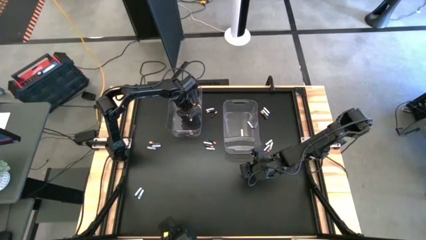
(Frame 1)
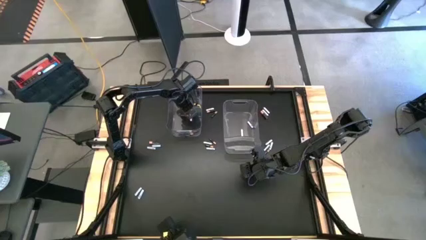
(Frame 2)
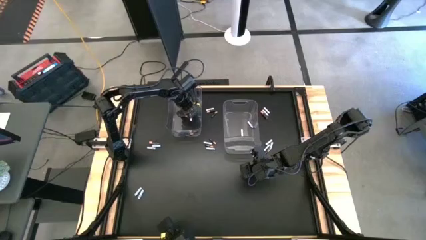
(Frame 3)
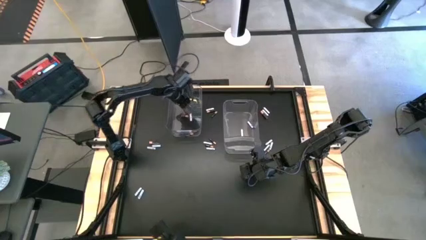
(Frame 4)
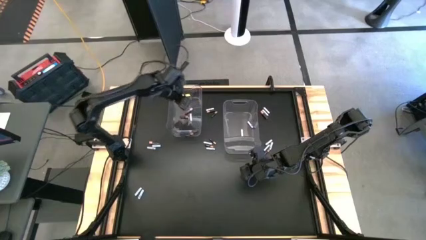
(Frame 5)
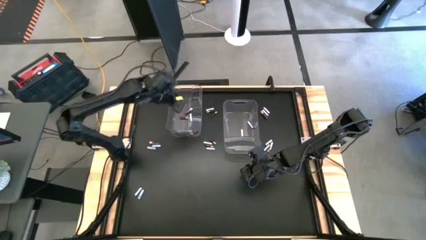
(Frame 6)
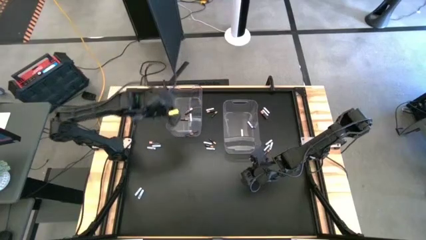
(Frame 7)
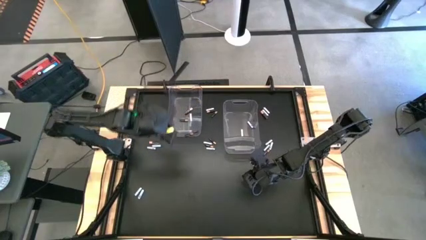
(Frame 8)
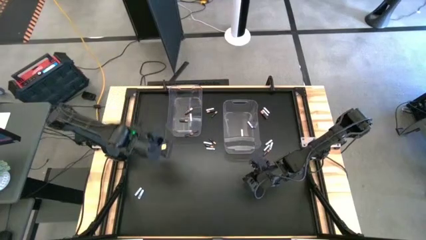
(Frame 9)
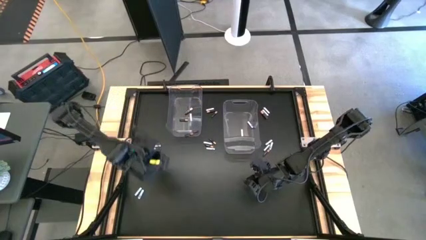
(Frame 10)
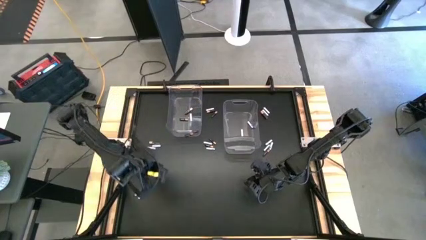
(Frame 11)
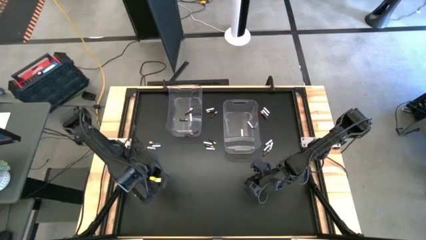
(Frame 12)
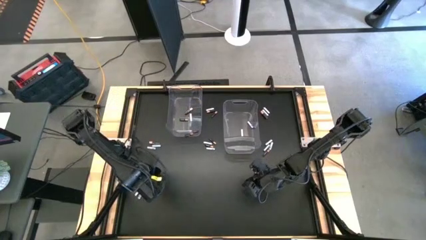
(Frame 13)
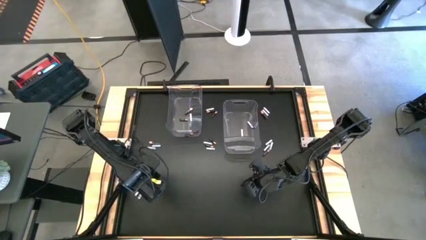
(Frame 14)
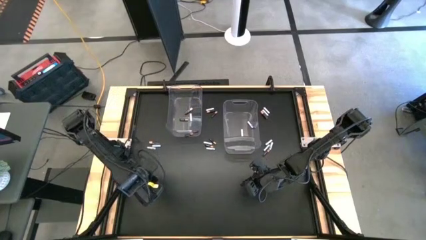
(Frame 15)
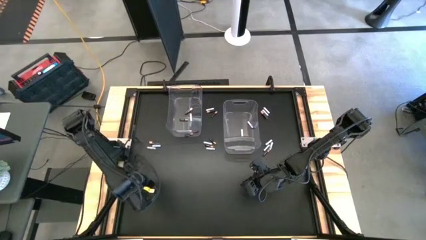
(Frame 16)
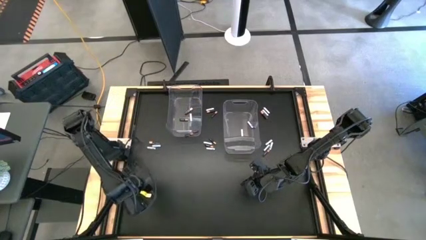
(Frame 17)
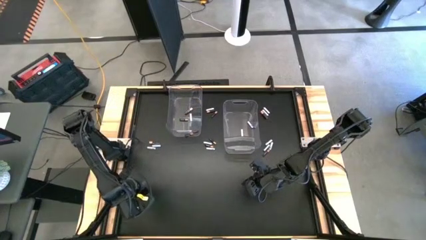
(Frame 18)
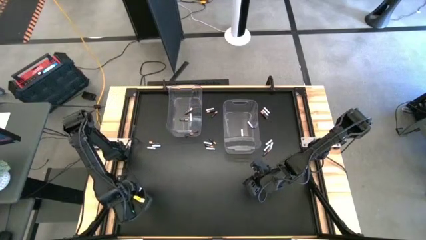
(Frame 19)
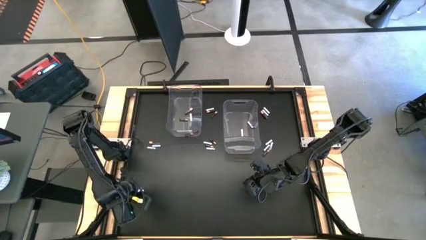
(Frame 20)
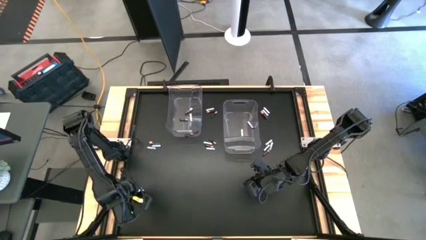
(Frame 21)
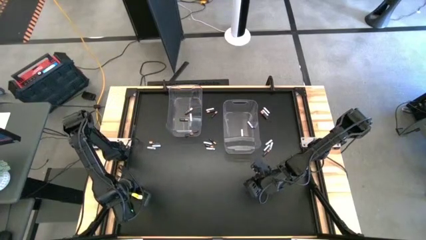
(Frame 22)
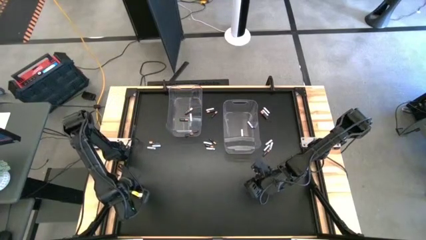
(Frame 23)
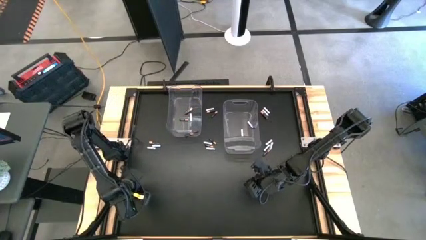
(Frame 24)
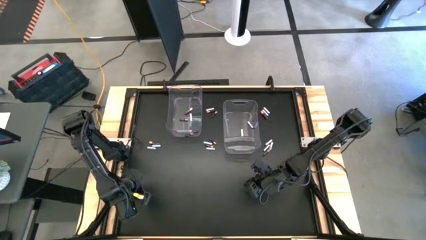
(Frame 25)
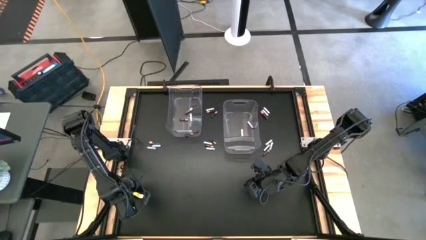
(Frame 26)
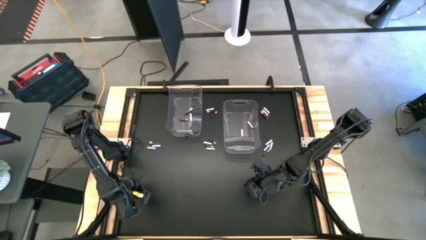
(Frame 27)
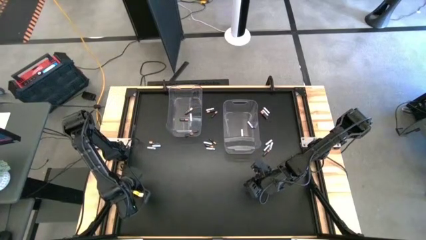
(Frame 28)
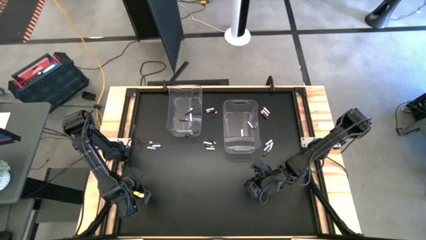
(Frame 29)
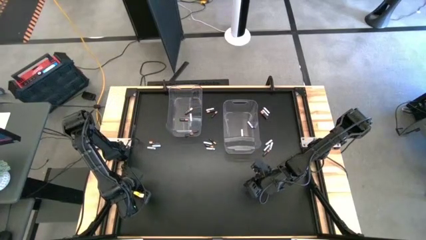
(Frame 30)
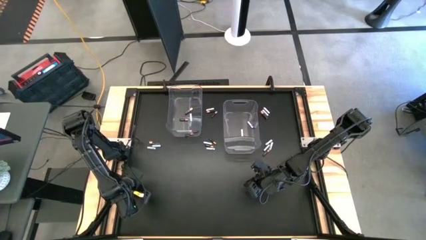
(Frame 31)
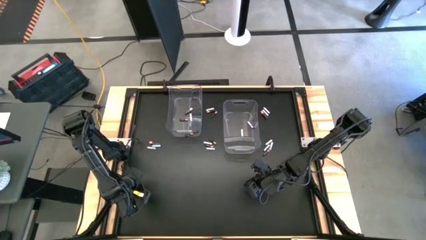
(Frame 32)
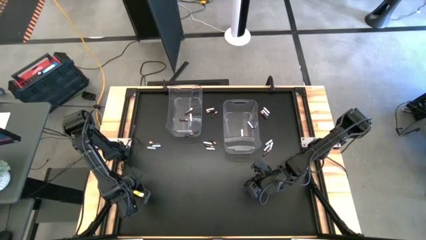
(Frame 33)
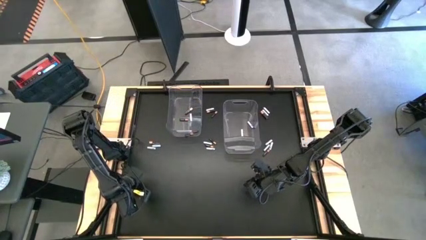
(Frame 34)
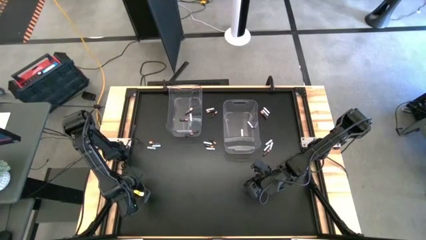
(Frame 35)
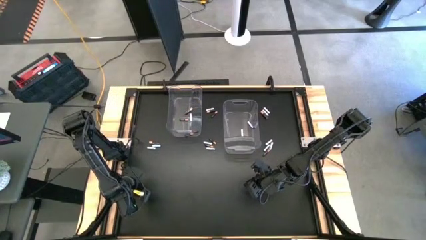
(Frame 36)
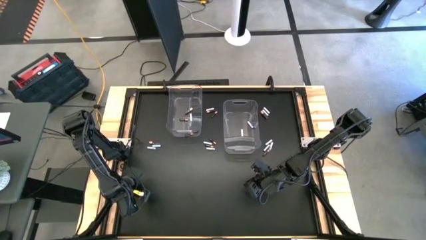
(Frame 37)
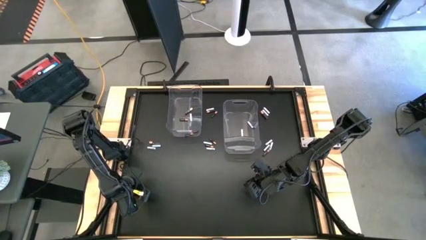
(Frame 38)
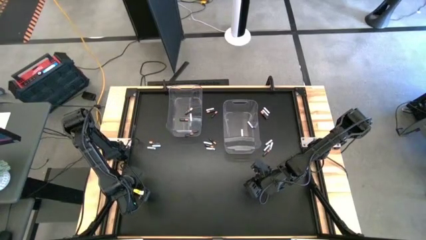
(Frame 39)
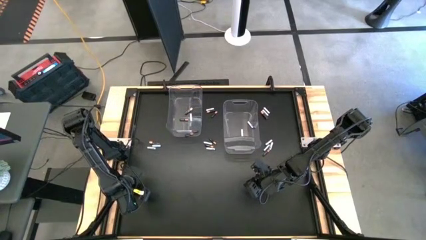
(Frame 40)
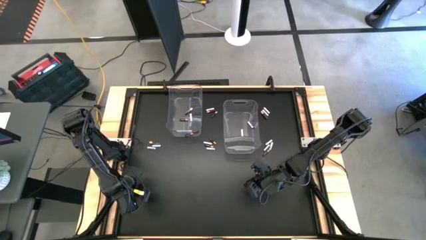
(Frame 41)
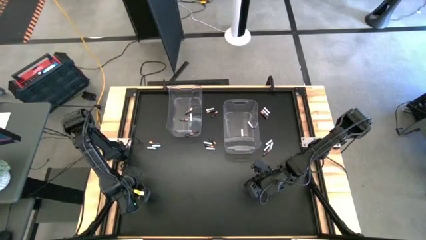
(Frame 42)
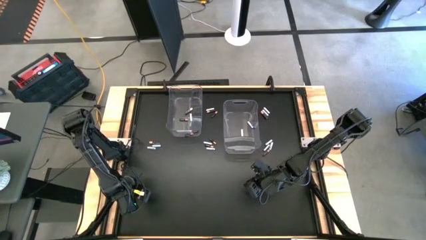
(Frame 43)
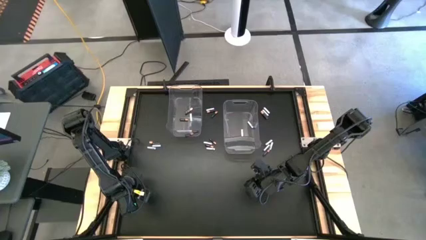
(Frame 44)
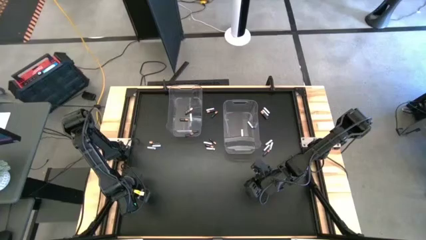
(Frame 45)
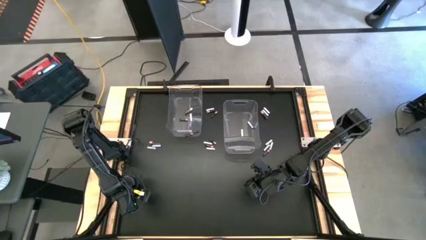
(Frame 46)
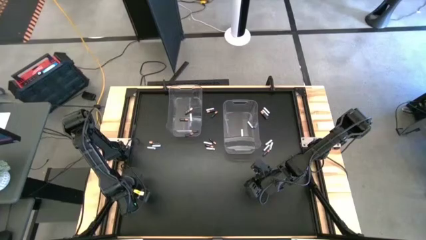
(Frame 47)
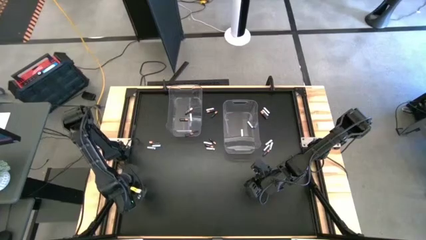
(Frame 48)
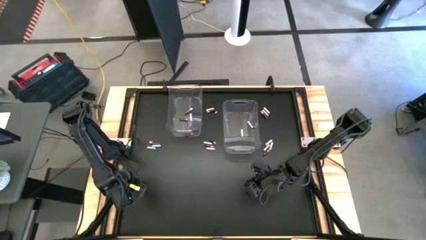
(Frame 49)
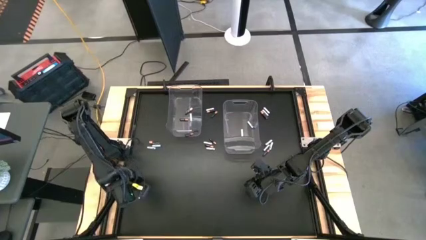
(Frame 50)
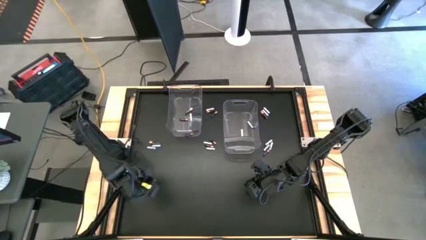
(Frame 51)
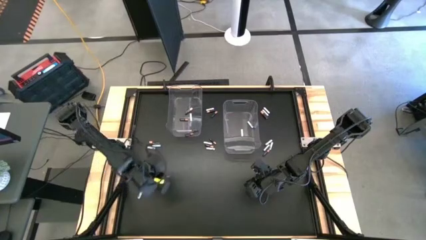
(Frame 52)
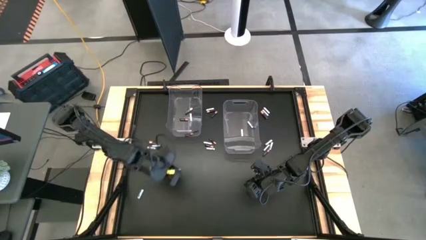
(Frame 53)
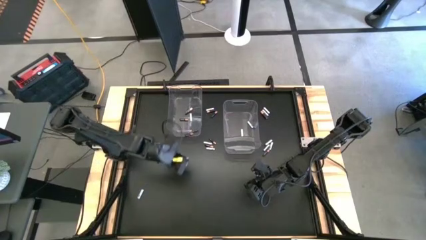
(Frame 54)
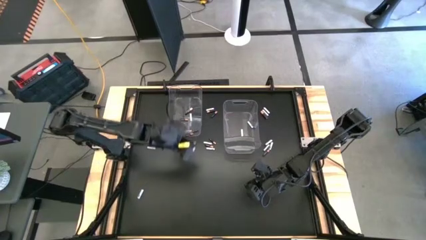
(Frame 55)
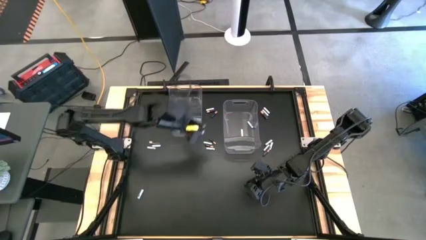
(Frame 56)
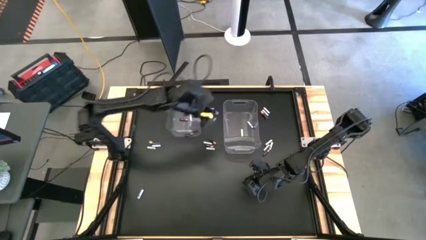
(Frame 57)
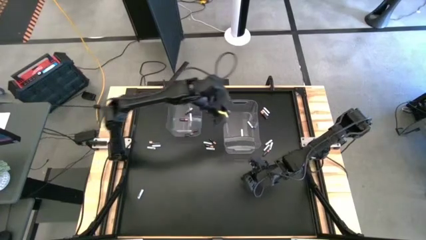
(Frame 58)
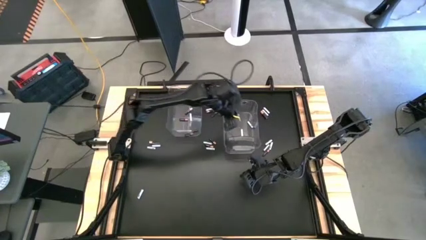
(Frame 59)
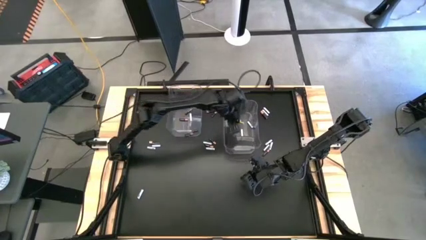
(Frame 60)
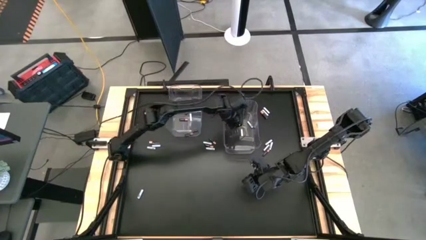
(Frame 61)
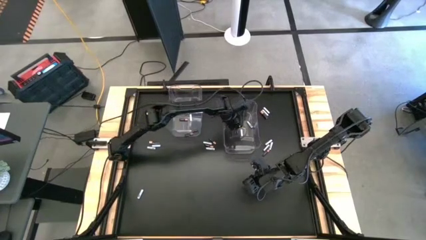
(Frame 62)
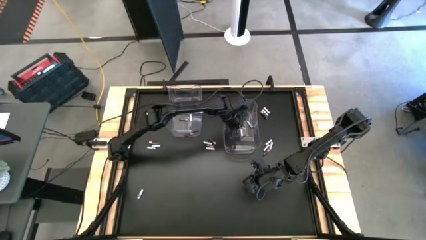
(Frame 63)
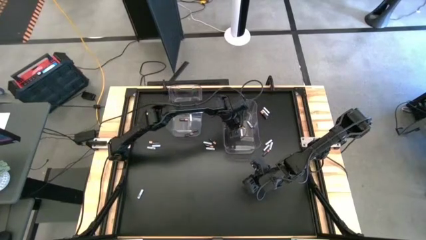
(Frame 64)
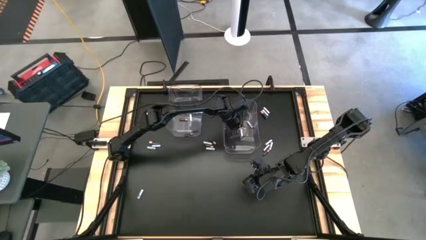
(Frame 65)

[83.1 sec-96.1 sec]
Task: Sort batteries
Put the white battery into the right transparent bin
